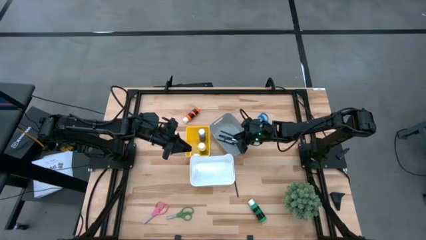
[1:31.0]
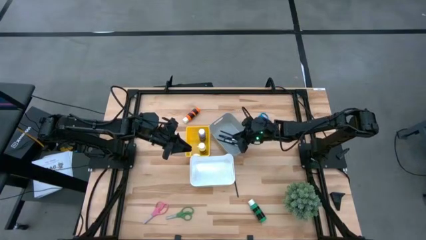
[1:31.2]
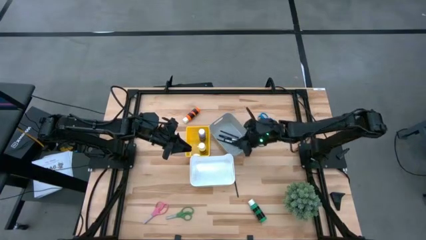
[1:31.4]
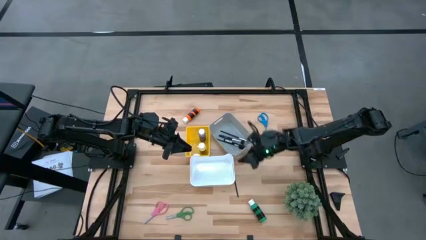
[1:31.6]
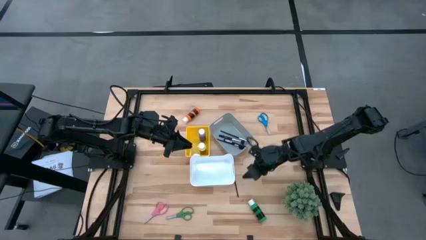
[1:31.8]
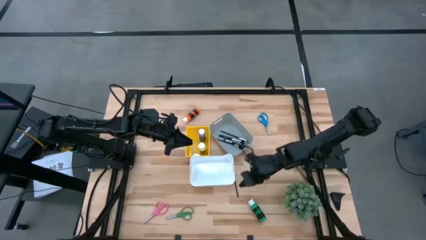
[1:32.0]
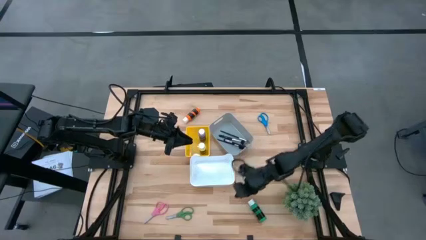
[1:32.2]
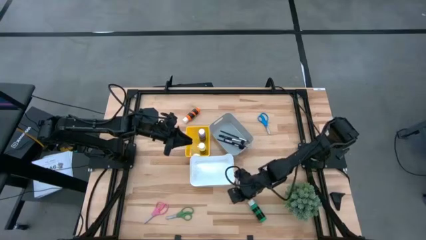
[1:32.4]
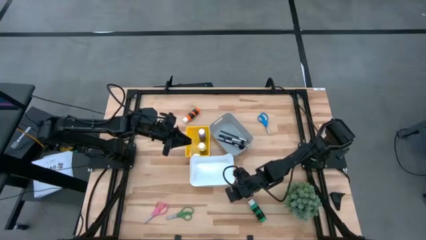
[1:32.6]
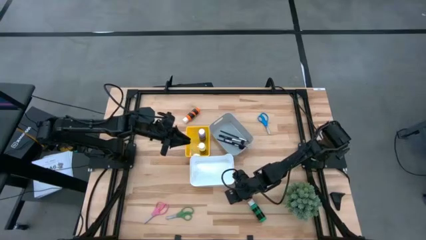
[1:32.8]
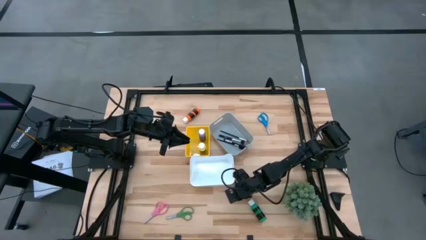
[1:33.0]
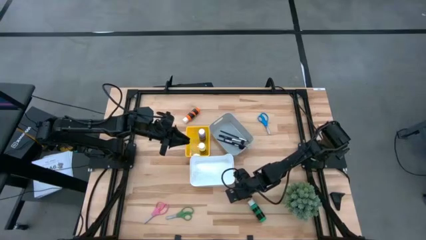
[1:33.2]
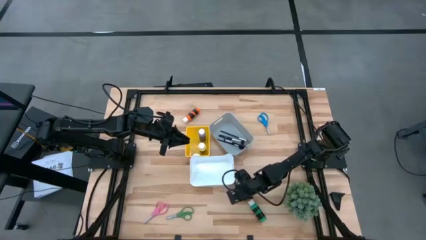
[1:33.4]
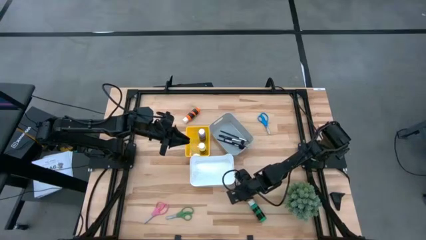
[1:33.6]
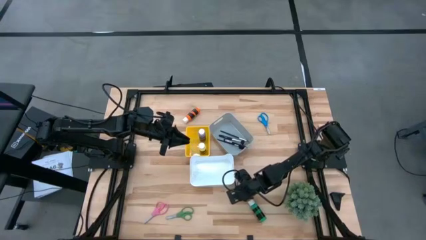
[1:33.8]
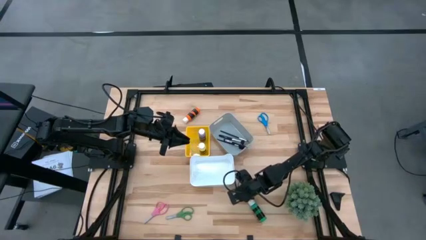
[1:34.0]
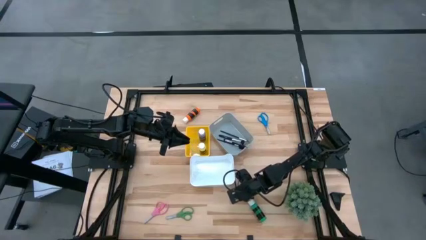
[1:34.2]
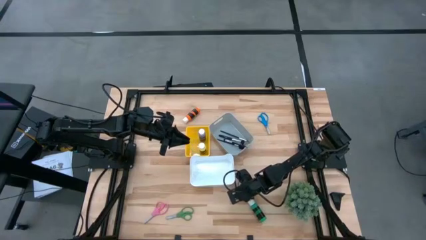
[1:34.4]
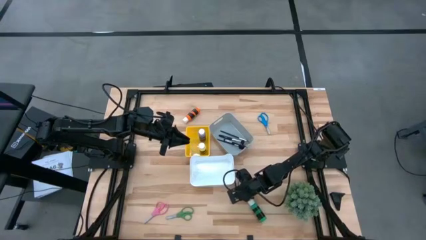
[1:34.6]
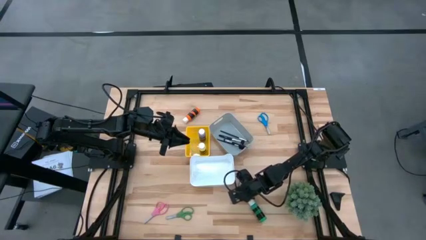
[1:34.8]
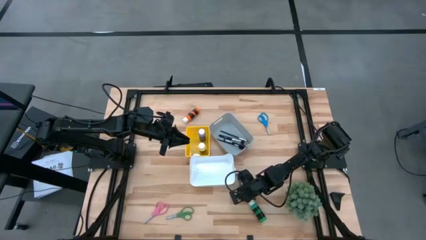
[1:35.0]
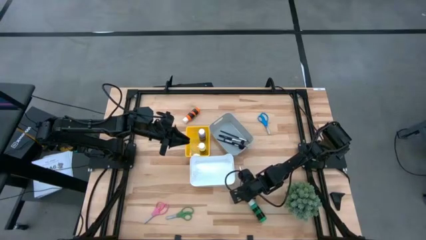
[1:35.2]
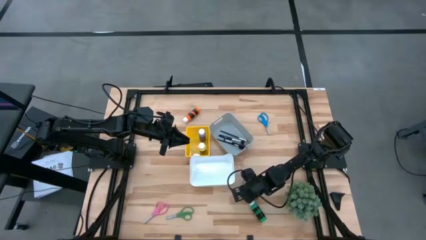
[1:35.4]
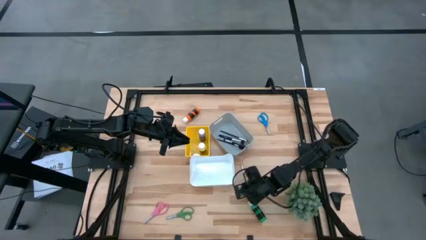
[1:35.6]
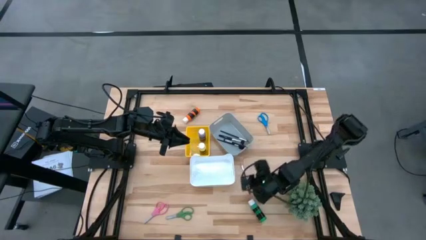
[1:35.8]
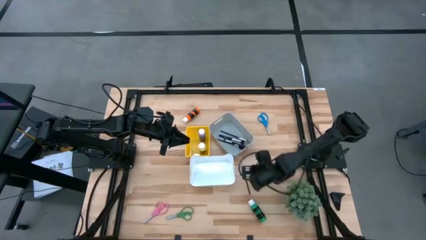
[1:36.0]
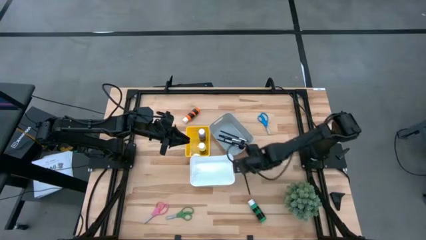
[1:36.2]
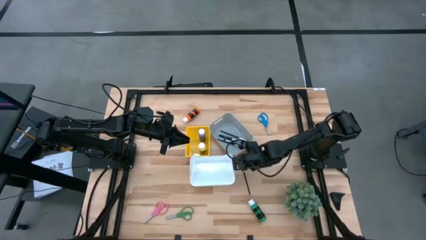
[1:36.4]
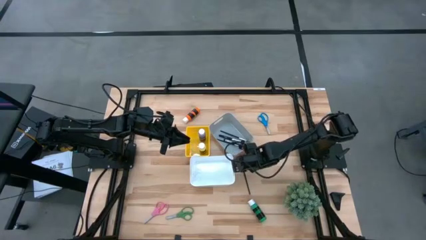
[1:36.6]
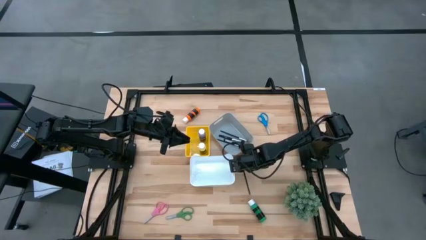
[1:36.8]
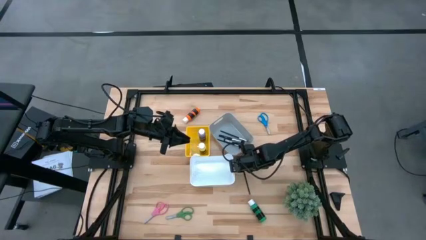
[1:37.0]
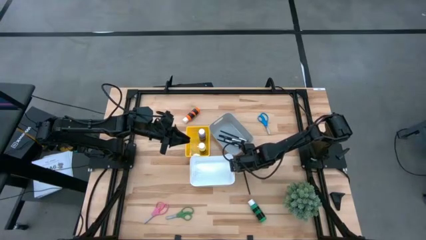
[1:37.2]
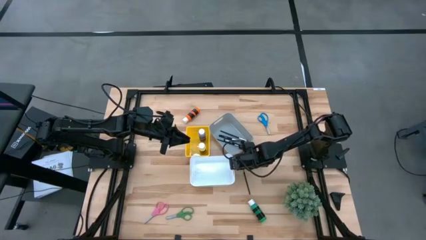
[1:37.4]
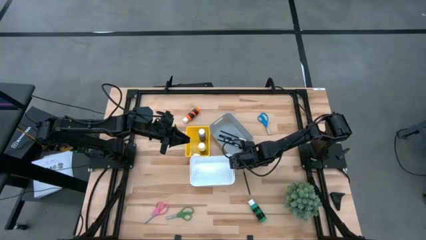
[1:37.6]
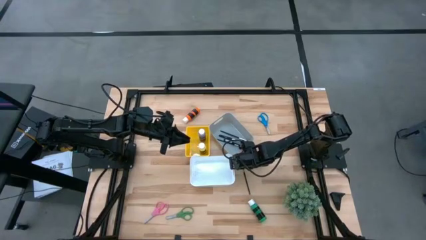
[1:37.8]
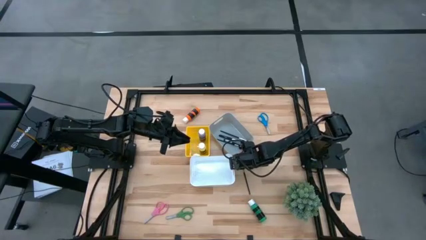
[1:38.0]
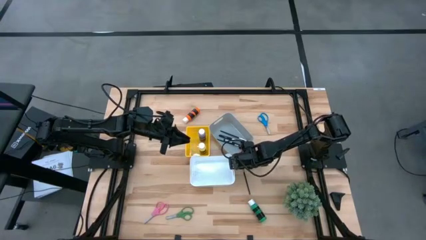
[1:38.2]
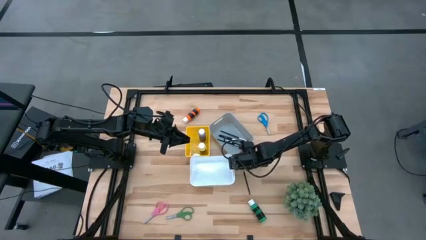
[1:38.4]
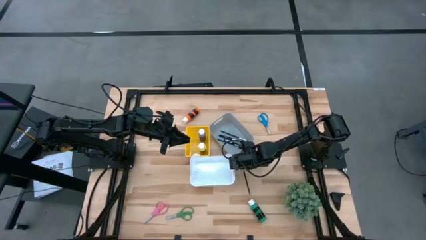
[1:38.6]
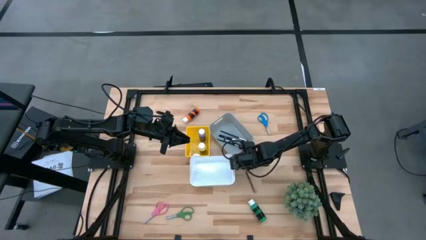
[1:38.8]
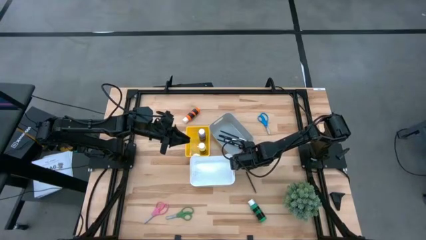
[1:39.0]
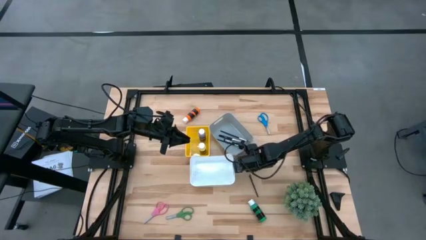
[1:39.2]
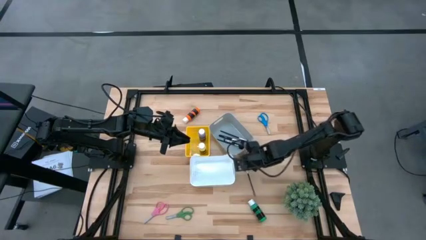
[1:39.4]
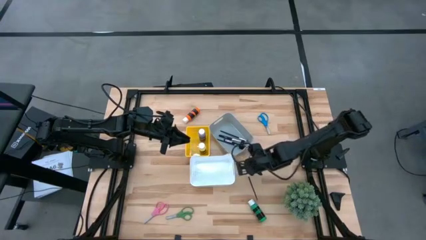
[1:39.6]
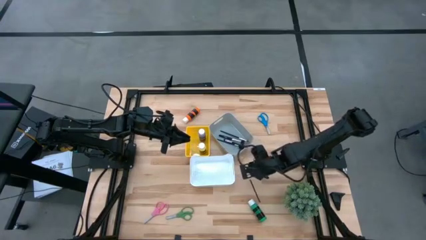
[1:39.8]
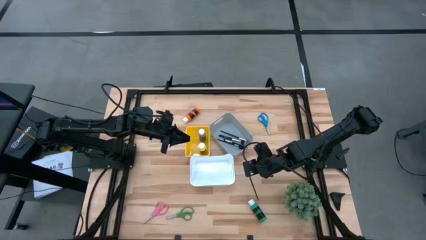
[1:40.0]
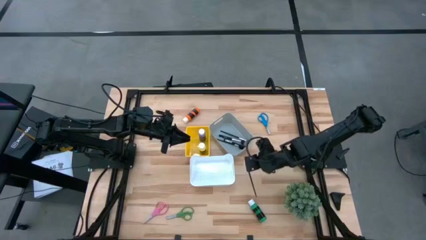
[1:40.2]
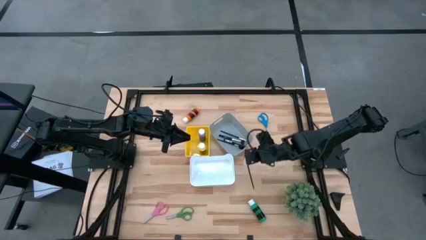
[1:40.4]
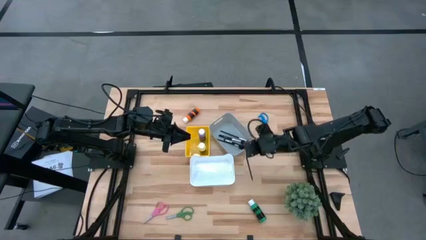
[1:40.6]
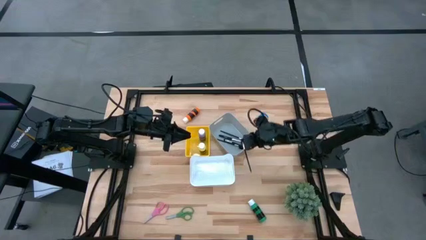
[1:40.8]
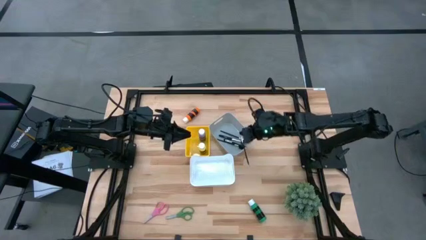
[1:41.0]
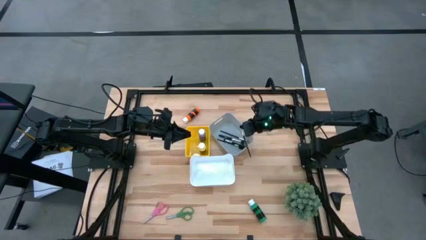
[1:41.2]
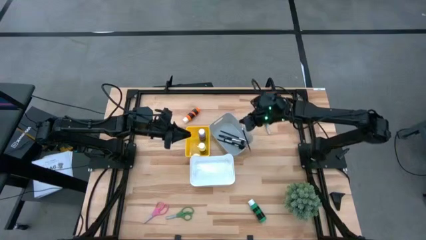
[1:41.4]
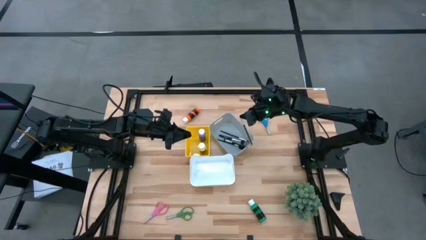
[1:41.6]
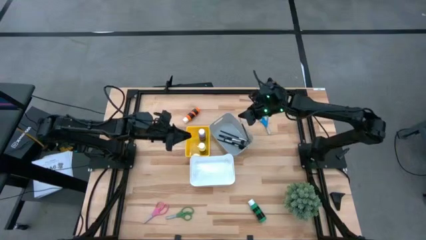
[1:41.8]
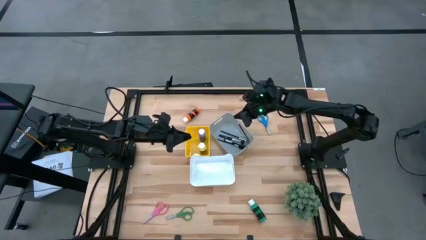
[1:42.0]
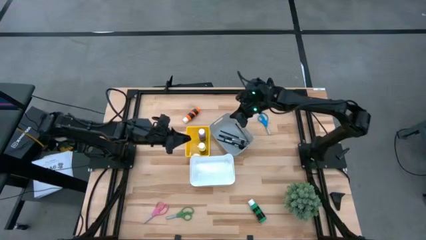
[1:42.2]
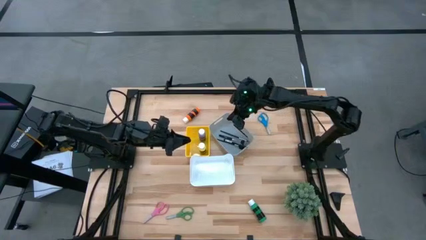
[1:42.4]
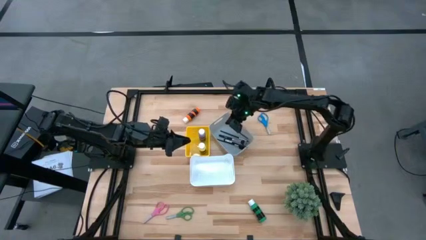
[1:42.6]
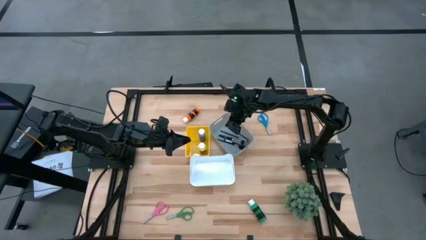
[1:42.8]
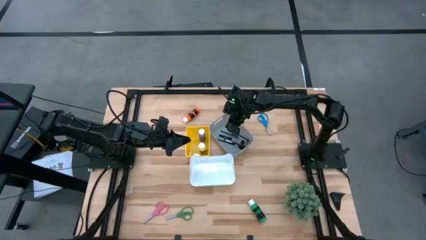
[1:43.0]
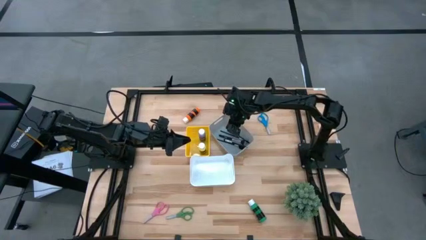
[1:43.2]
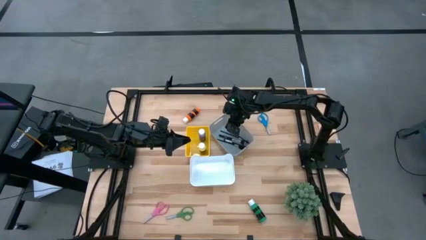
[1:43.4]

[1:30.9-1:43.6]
Task: Pick & Place Paint Supplies
Put the eyeshadow brush into the gray bin

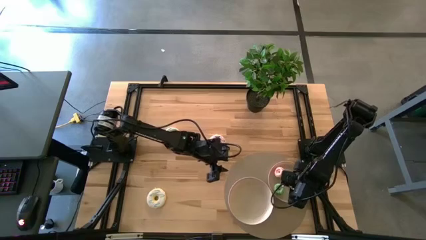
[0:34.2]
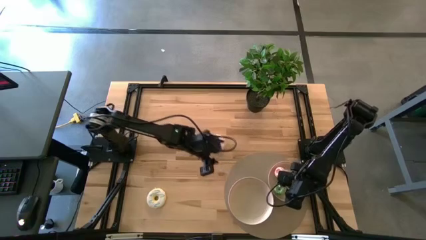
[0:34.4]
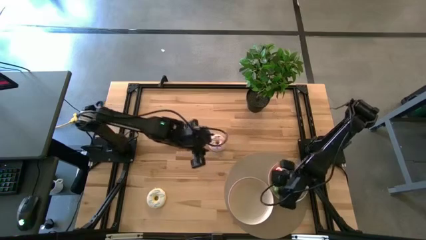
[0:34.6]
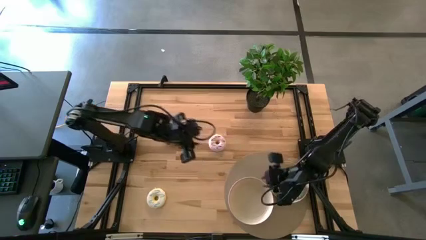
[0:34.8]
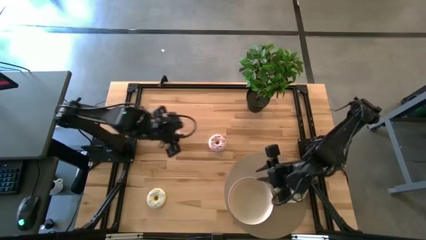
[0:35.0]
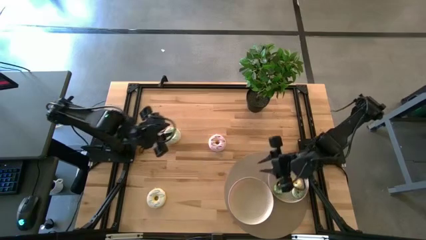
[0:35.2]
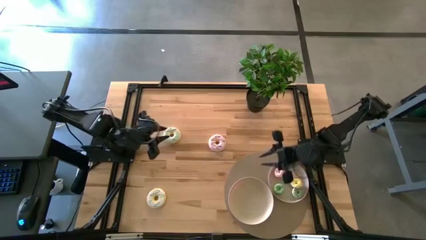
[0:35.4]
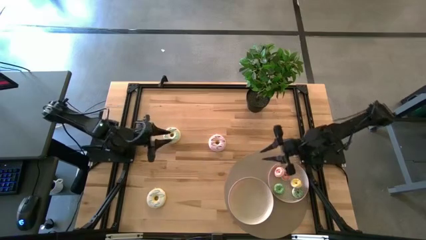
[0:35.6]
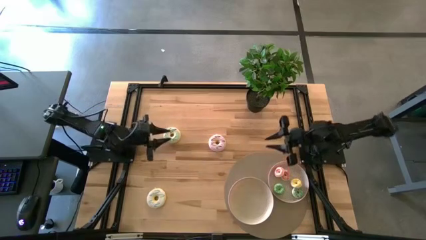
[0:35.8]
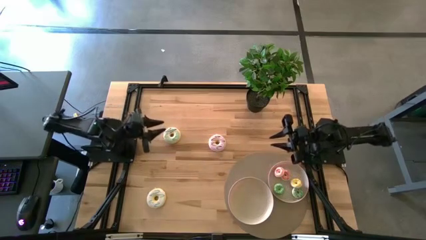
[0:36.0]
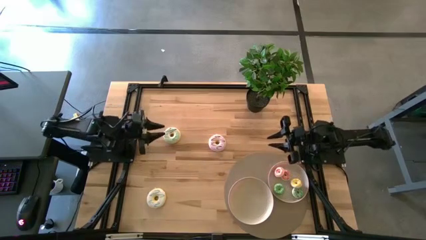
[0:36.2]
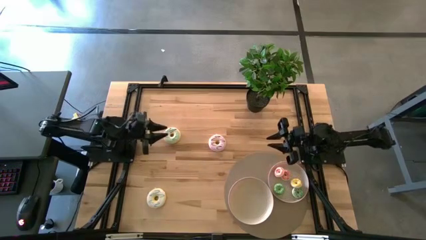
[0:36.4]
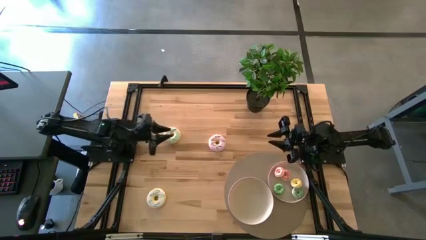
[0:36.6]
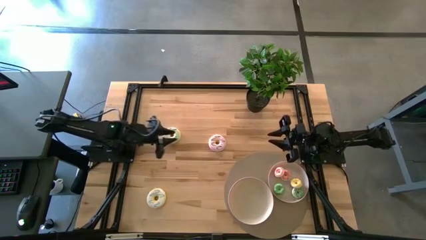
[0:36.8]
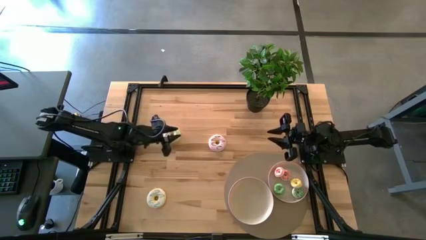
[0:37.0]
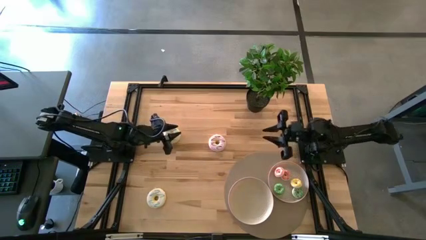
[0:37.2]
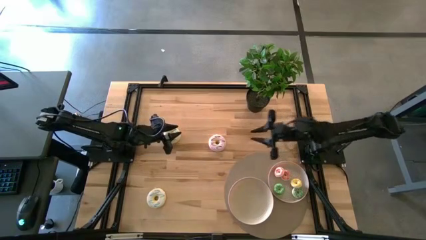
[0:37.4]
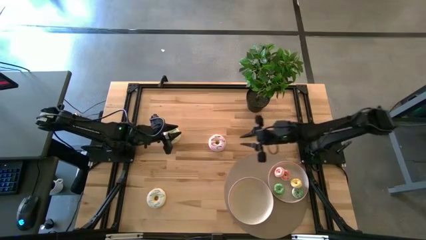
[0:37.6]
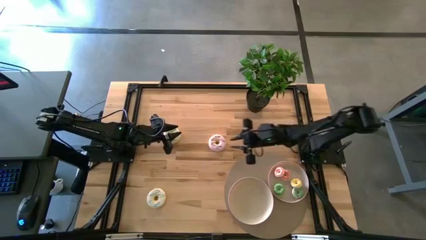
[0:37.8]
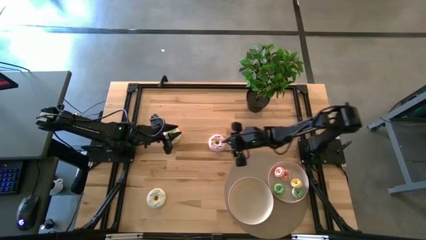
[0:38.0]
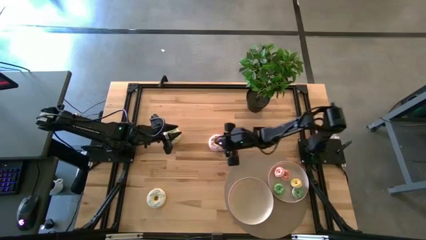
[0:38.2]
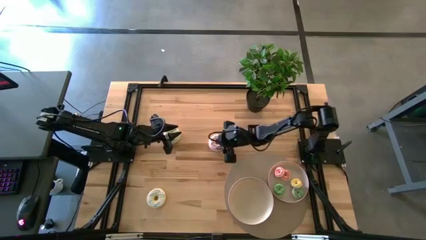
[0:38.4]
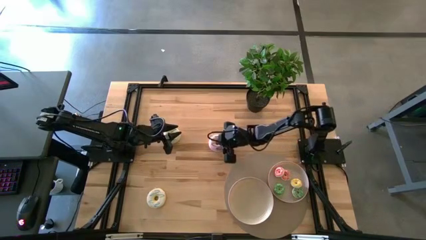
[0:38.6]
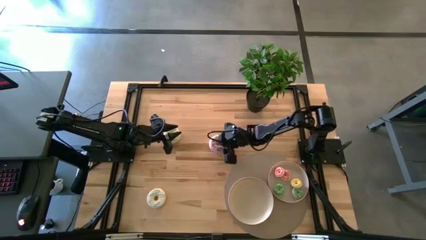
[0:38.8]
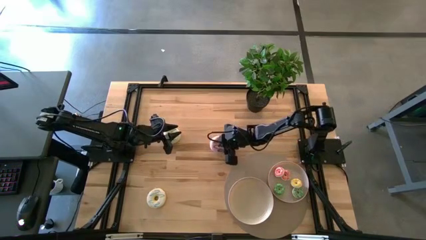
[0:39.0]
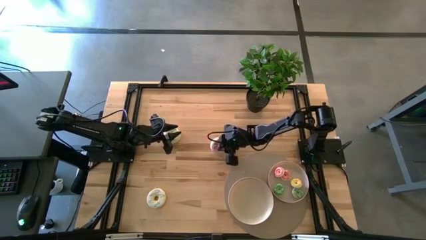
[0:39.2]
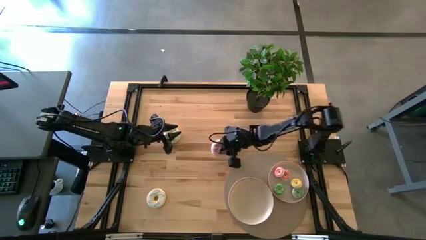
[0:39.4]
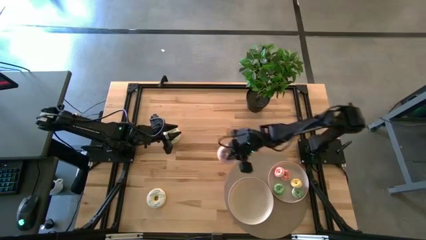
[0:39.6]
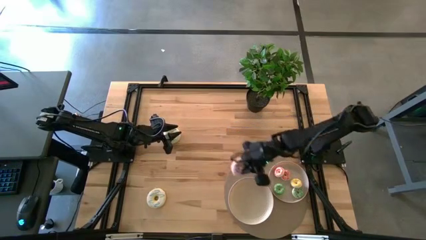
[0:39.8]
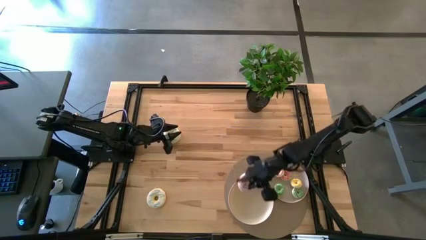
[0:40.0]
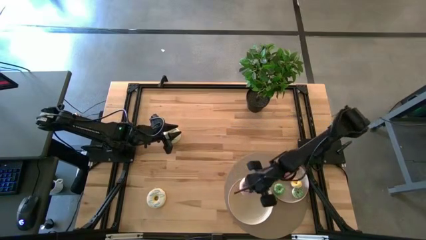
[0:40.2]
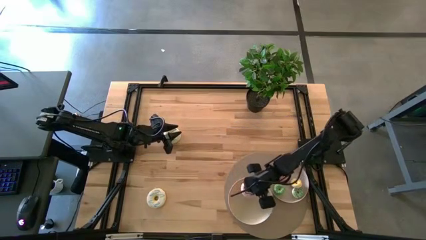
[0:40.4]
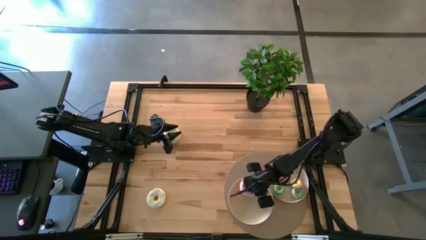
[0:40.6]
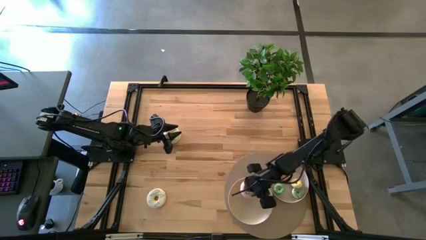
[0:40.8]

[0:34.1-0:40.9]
Task: Pick & Place donuts
Put the big violet donut into the left white plate
